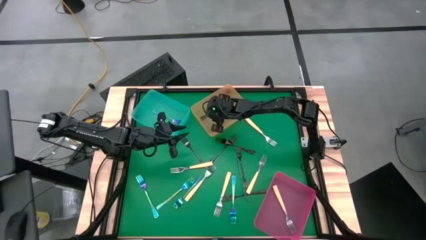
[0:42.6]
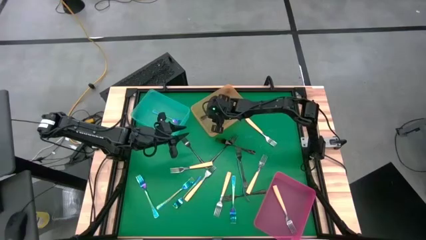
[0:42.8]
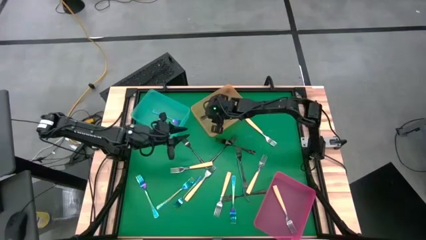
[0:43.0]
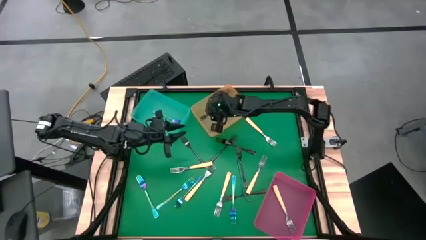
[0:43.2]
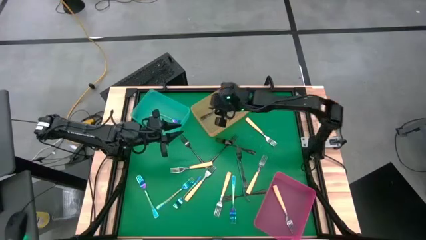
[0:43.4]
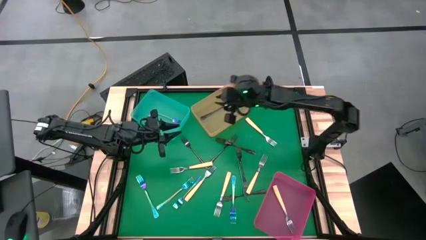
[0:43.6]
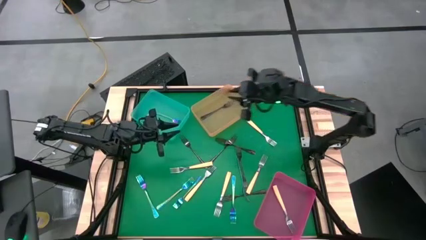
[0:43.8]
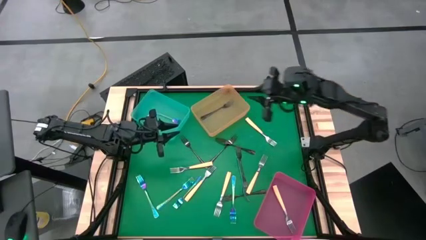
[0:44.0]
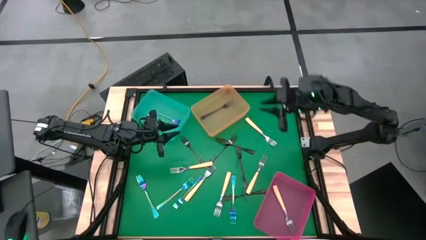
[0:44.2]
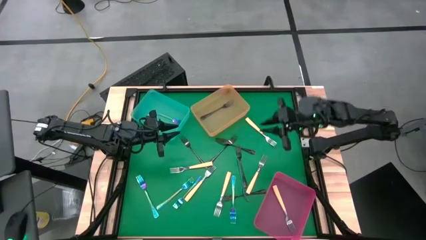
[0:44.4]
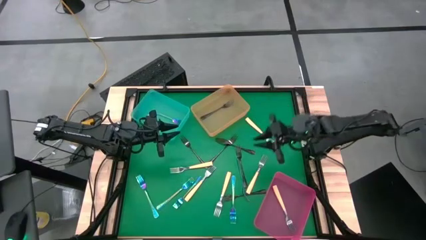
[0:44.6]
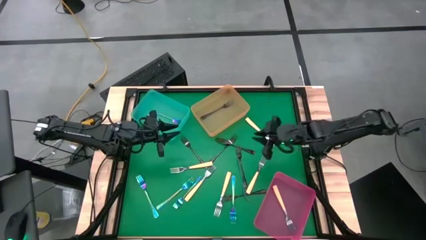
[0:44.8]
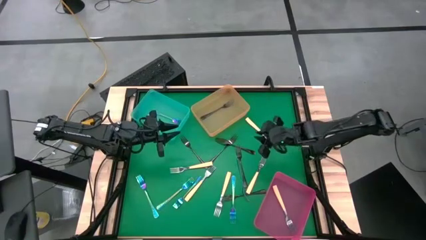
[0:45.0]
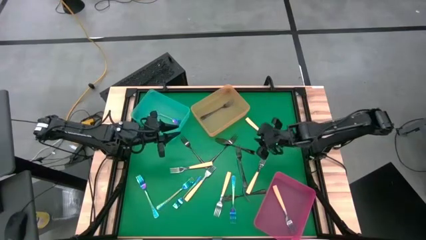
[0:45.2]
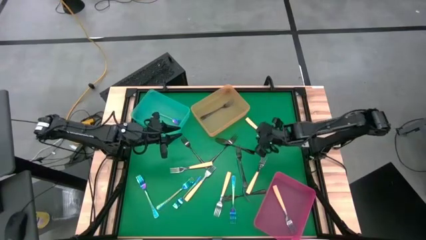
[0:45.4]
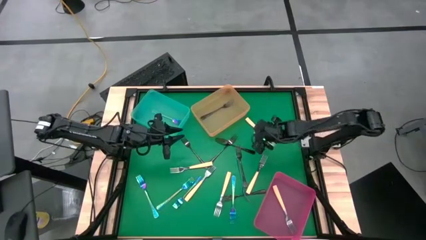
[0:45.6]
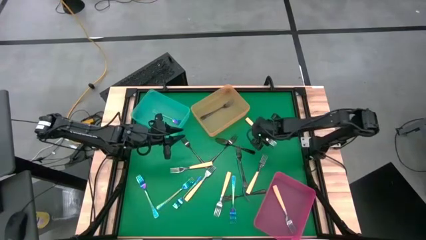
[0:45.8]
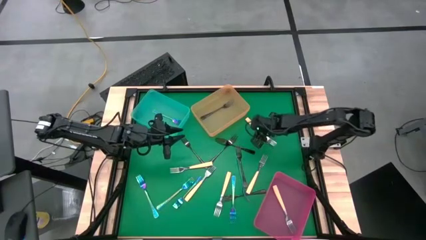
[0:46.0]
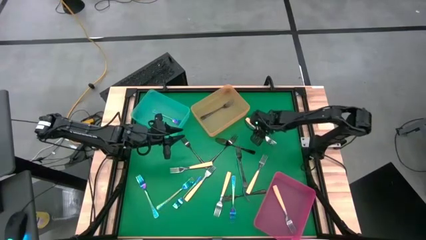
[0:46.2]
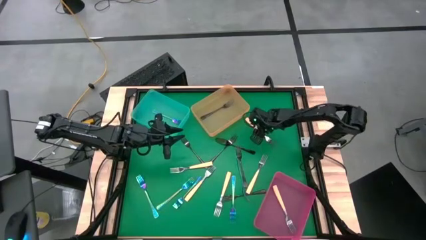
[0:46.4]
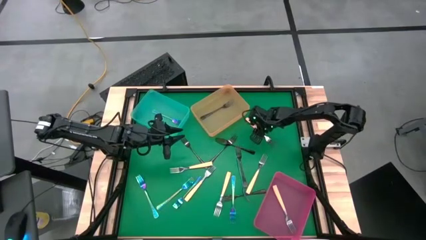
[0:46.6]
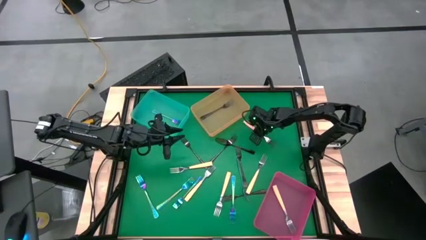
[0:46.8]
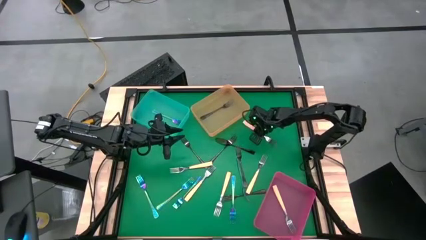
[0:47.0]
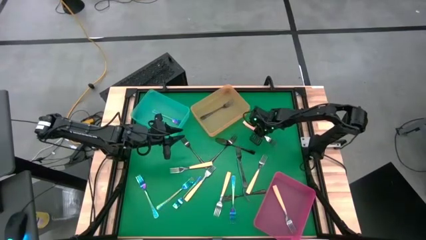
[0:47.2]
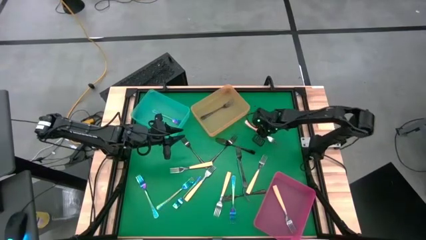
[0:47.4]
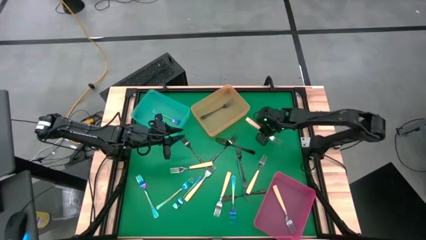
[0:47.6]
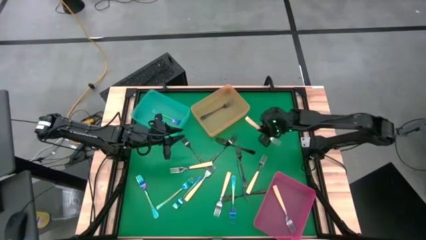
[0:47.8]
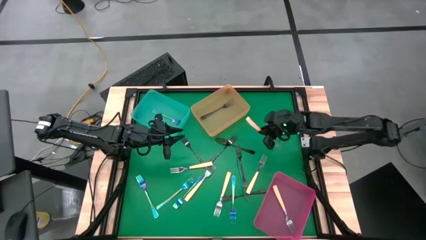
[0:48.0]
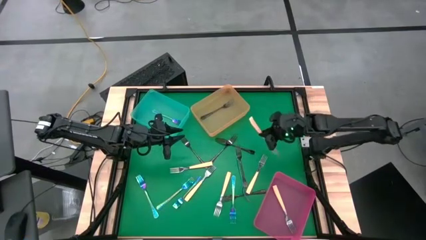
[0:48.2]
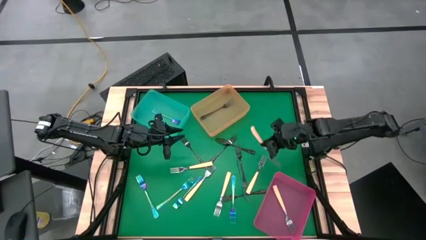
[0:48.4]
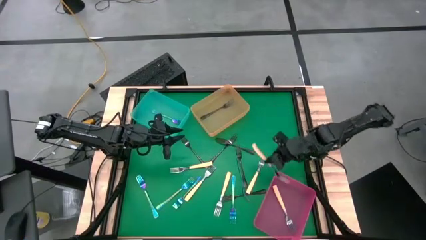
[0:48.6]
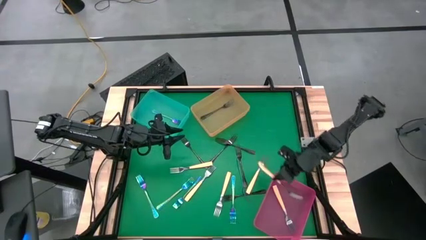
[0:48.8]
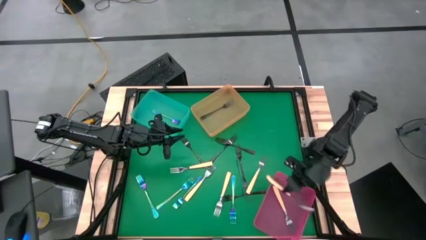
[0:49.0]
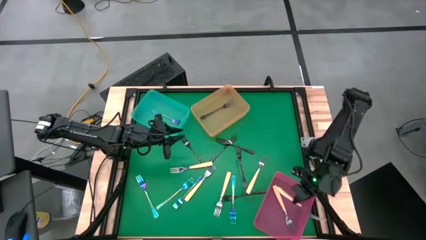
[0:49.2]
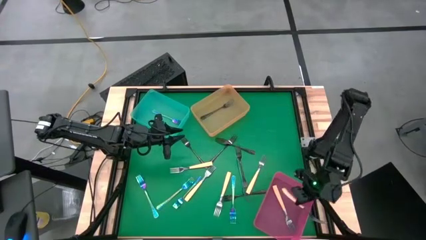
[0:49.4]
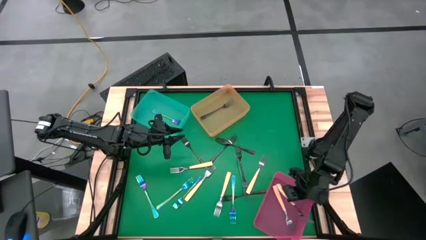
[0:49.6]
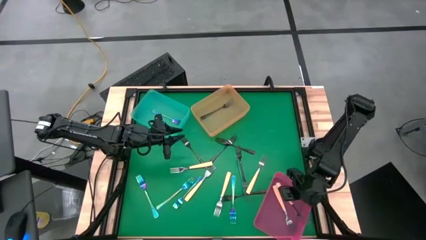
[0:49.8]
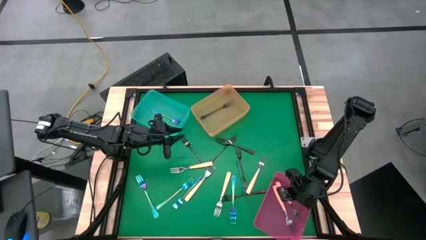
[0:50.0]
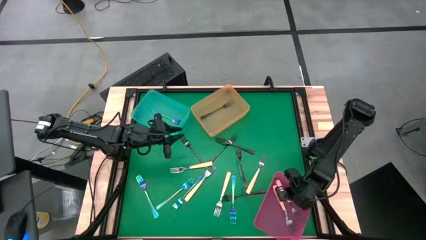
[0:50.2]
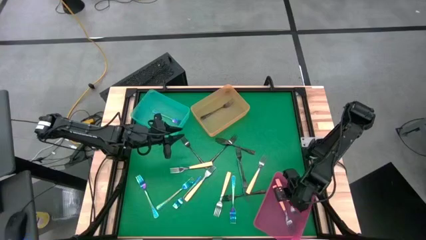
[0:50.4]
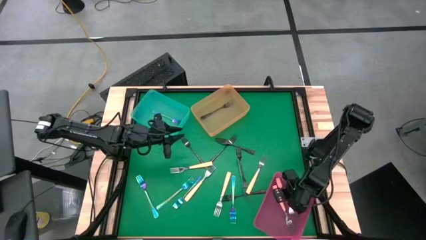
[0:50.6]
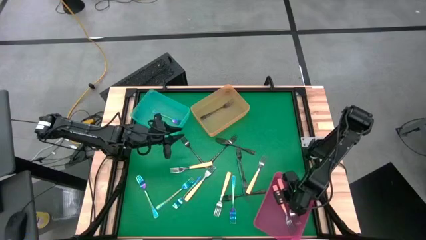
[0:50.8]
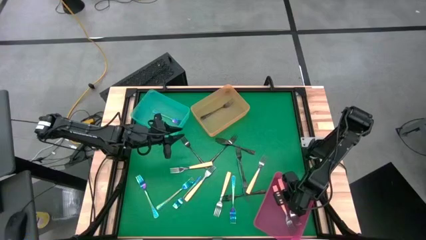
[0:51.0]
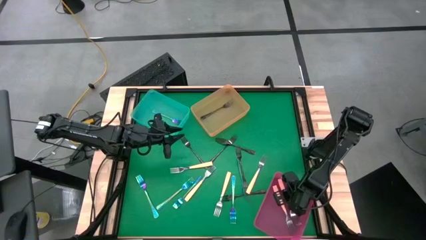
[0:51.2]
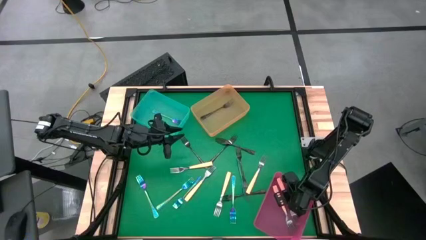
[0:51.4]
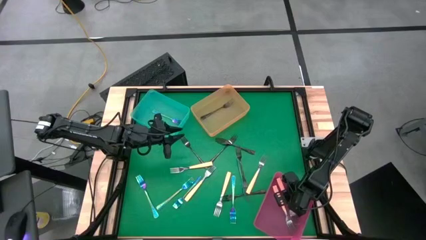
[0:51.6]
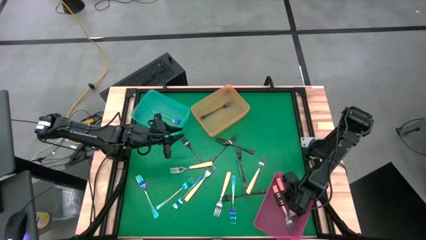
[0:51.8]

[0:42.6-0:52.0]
Task: Sort silverware by color (type)
Put the yellow fork into the pink bin

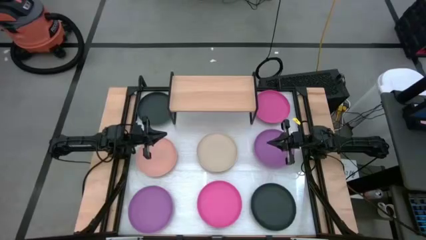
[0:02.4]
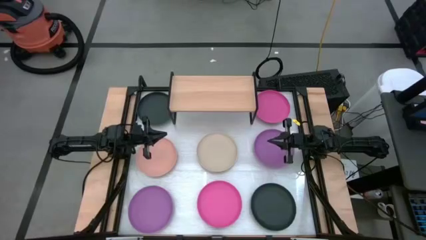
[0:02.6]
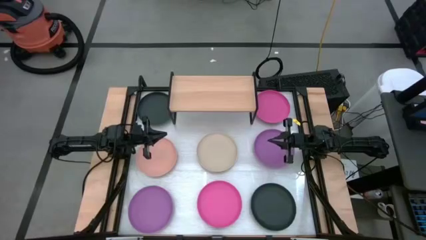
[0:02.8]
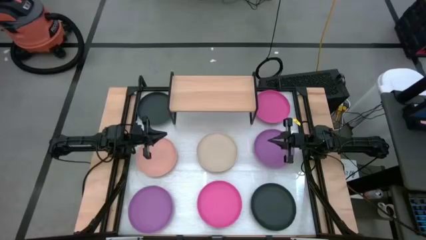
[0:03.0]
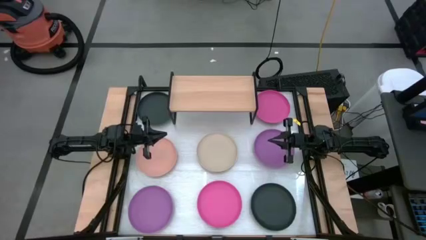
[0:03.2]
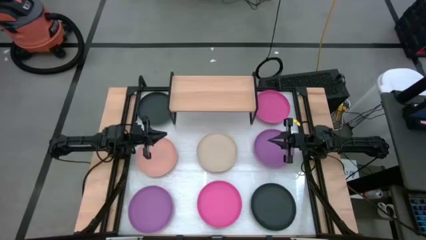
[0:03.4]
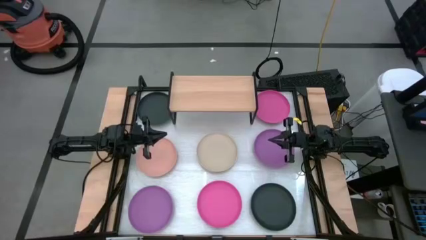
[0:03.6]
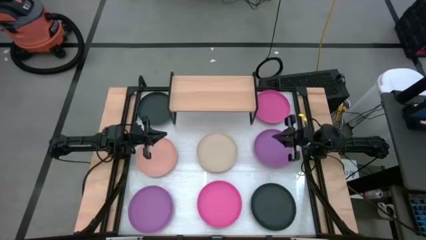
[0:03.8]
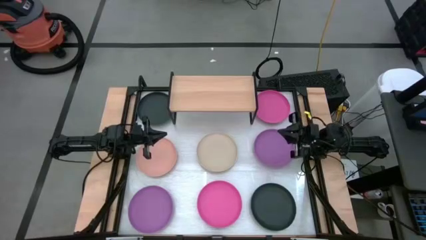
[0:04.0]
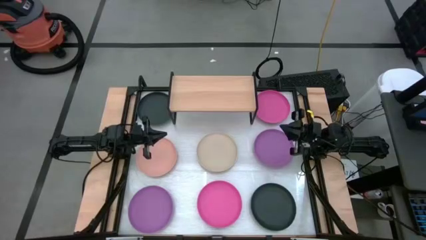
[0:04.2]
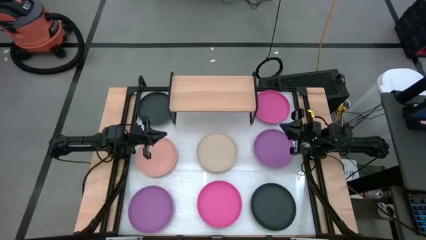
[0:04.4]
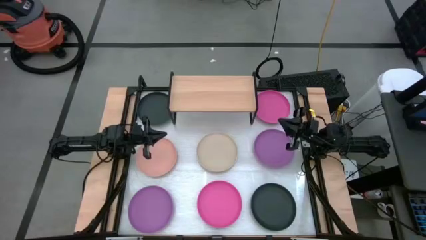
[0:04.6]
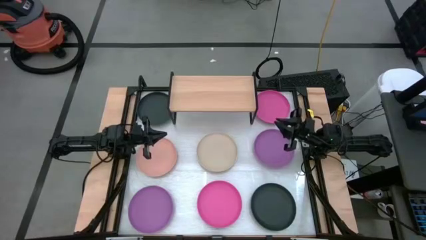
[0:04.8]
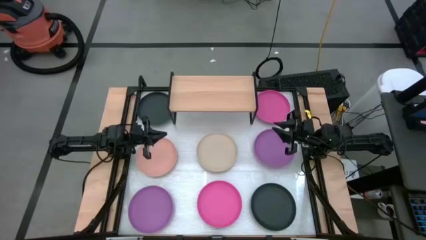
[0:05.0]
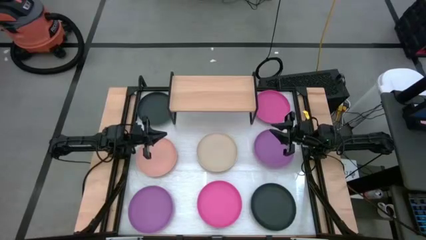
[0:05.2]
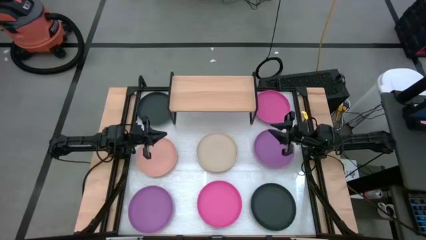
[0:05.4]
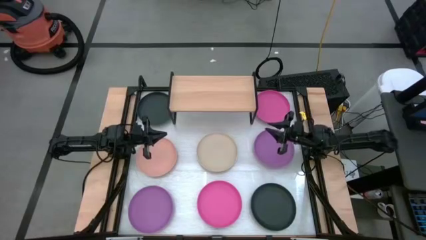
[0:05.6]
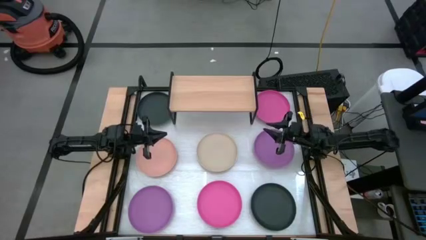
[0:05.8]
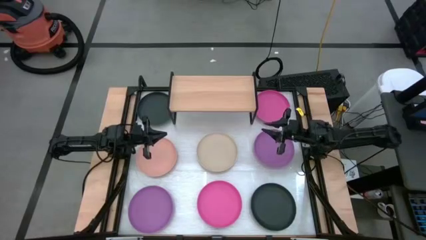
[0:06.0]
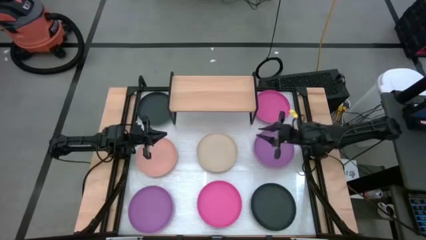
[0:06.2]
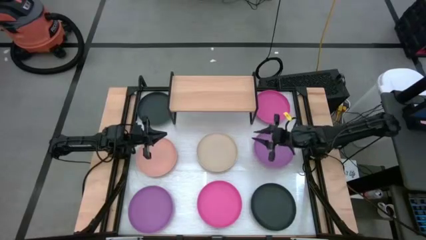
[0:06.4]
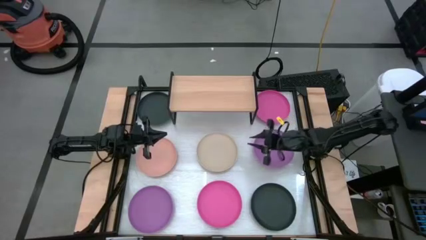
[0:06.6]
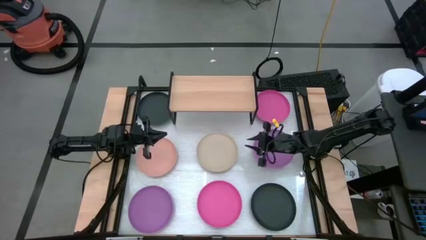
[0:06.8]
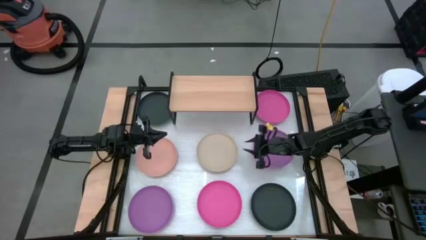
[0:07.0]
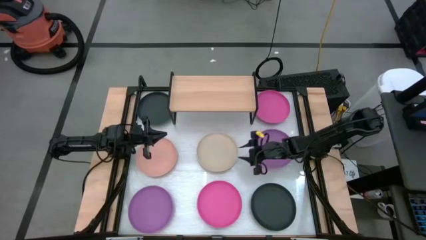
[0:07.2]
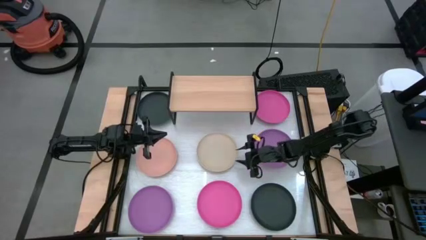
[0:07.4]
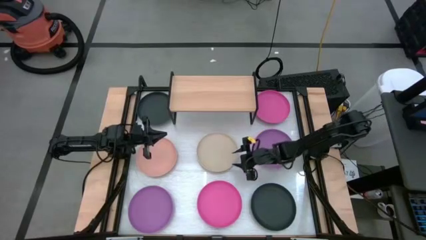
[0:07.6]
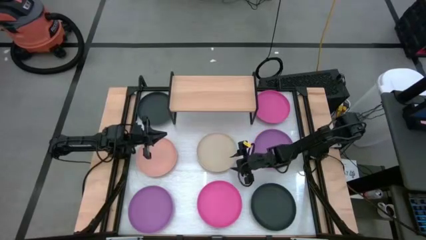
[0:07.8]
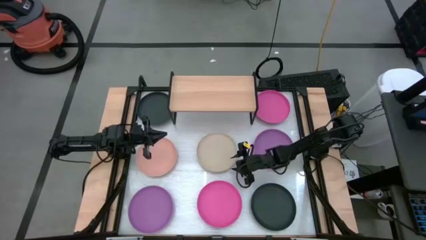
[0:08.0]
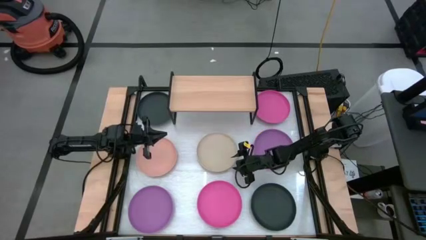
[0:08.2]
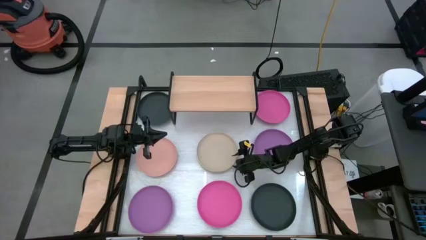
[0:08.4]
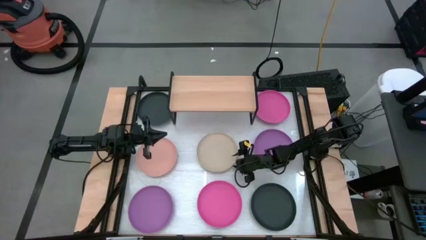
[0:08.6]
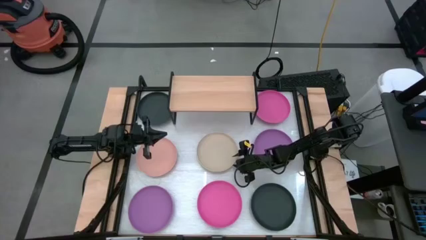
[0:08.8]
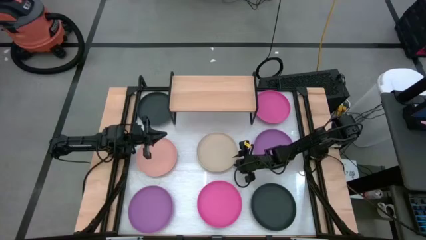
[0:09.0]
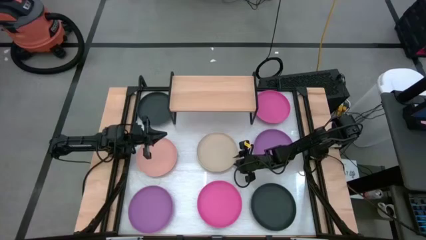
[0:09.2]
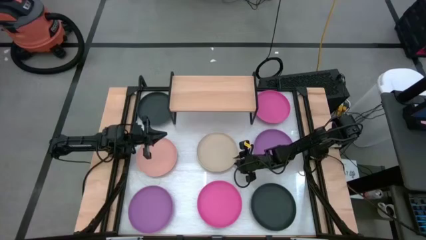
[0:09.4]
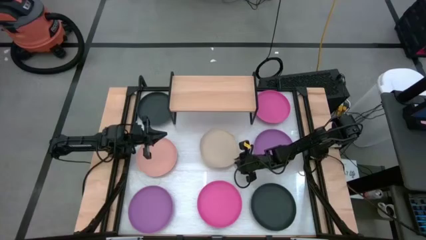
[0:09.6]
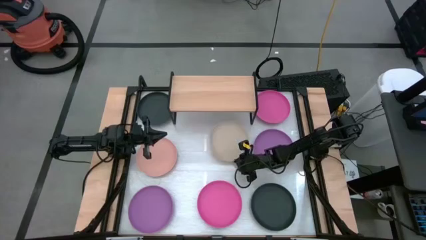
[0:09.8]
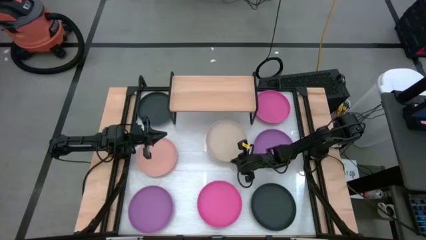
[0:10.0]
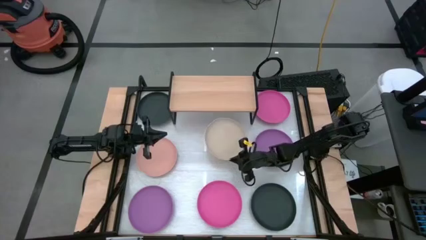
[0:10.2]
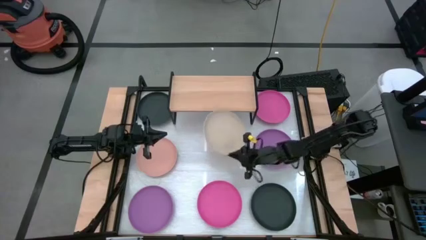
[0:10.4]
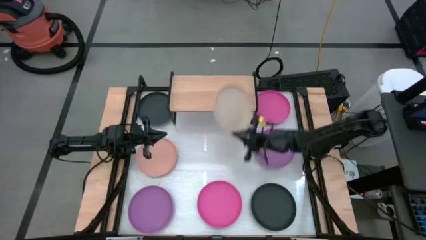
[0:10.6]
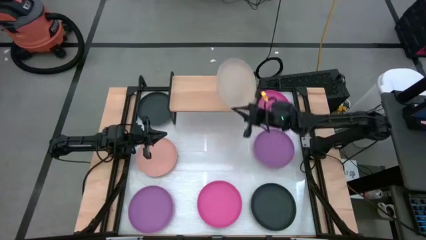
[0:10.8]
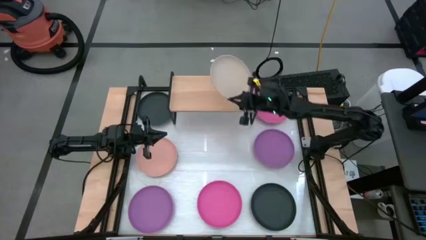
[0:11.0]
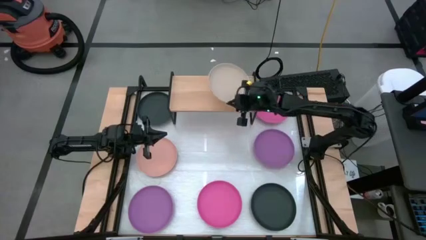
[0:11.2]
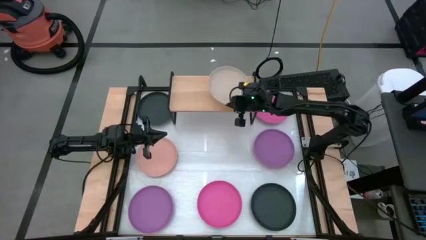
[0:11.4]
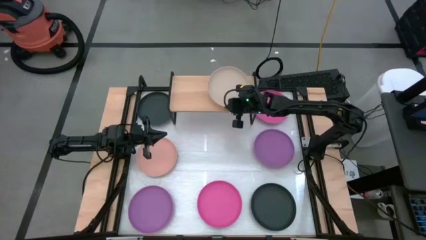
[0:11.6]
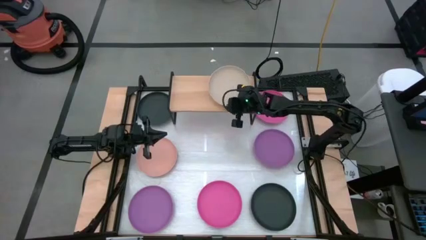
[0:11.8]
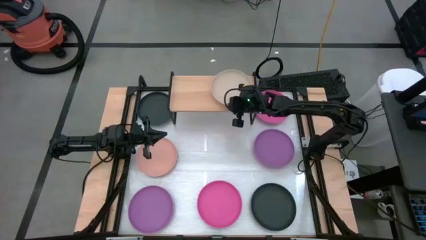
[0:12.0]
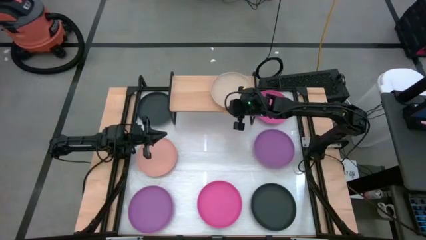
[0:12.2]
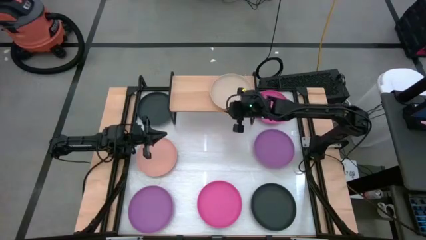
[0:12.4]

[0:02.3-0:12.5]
Task: Place and stack plates onto a shelf
Put the gray plate on the shelf
